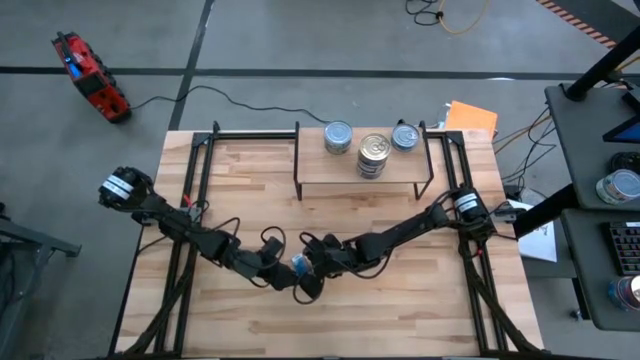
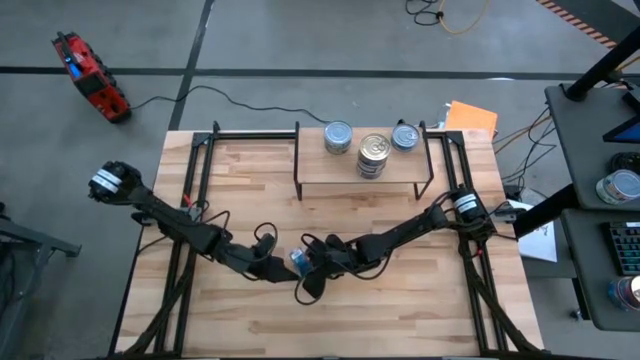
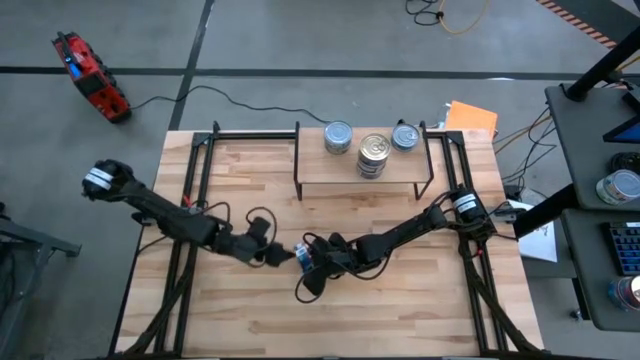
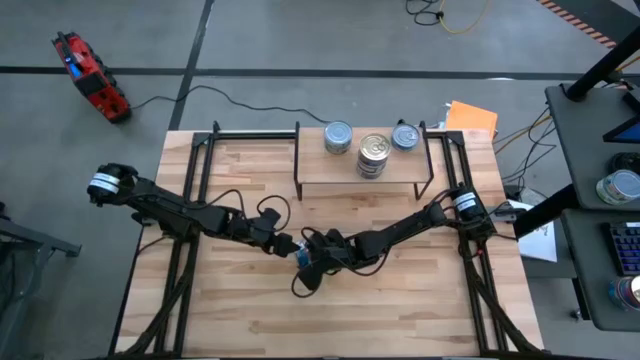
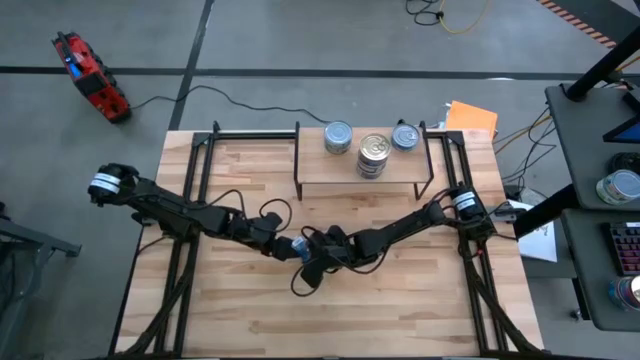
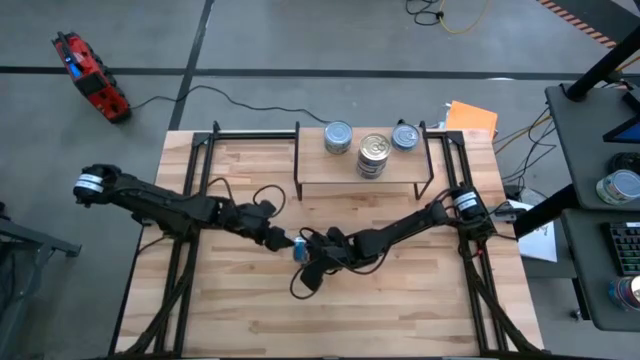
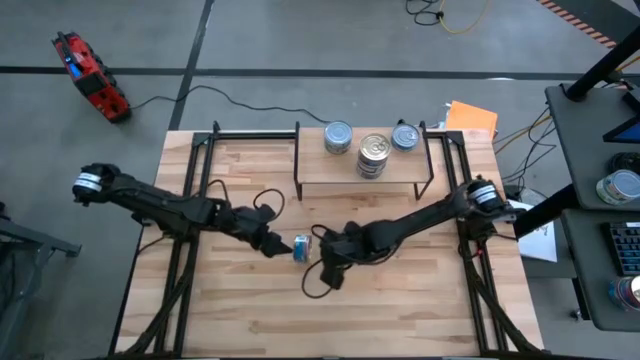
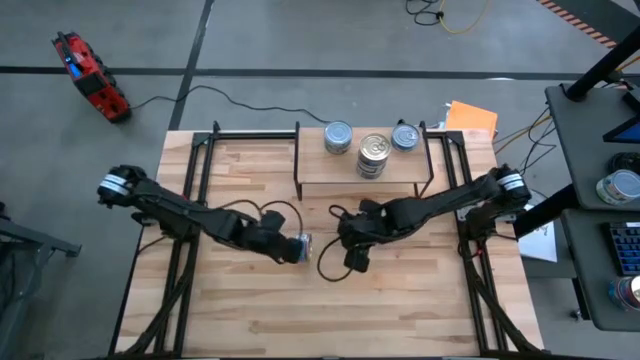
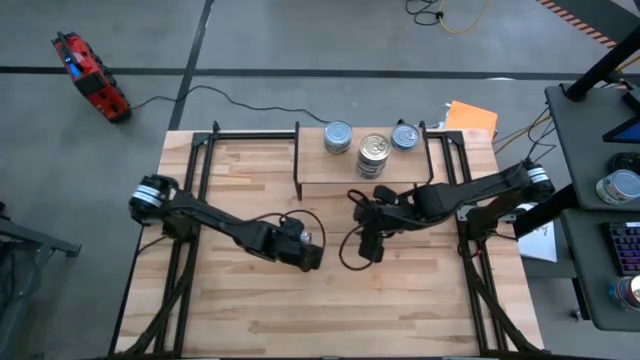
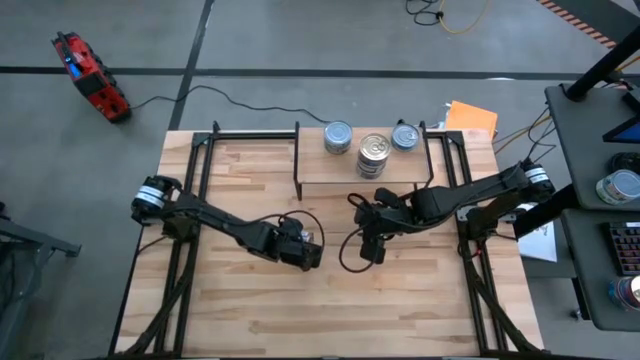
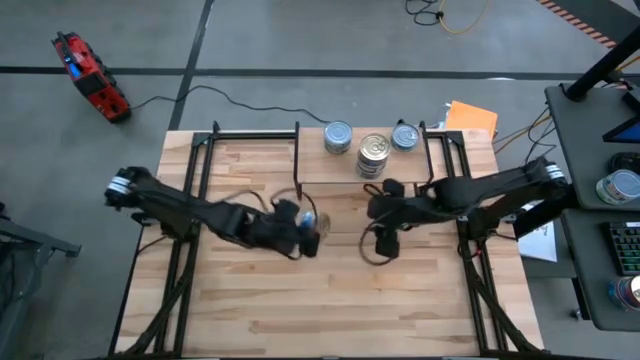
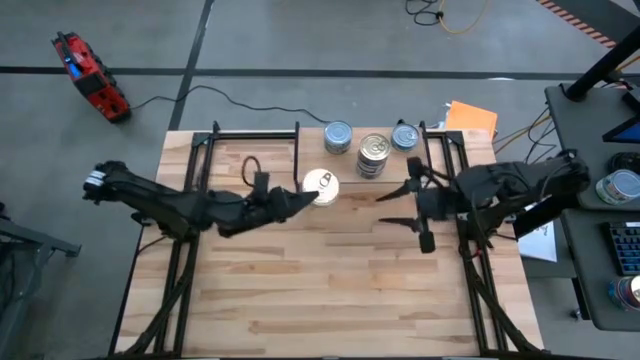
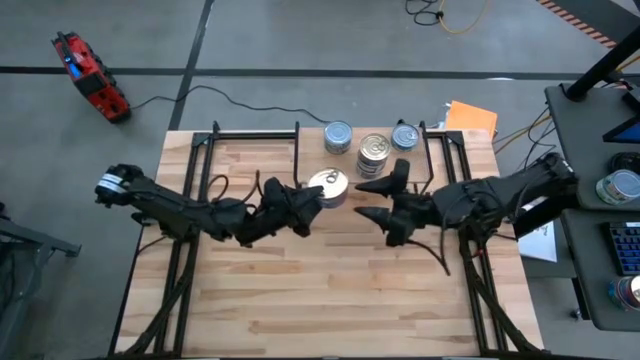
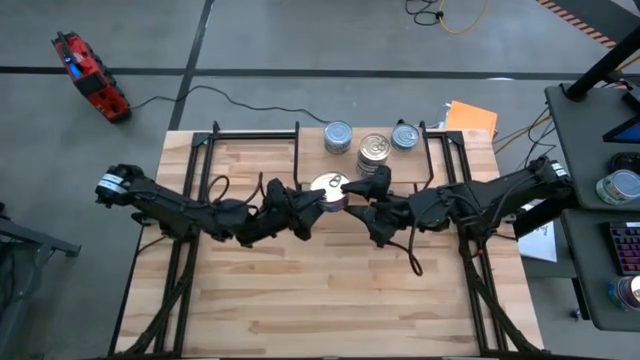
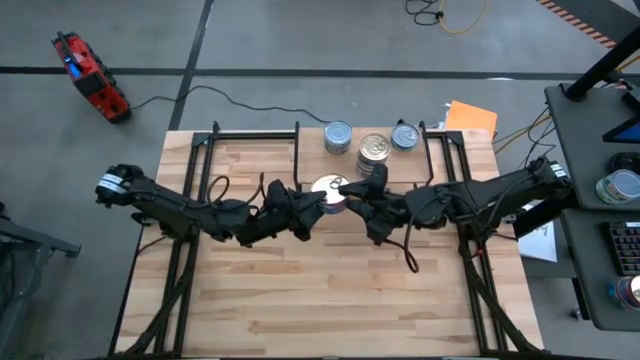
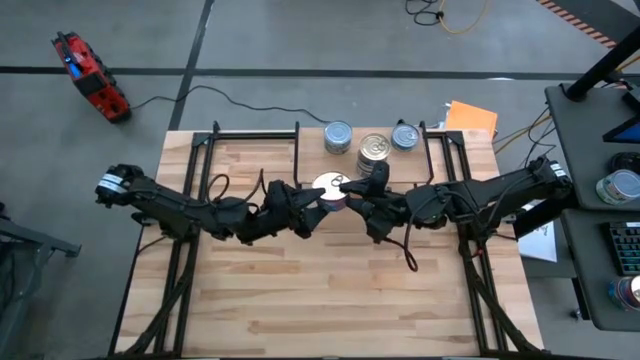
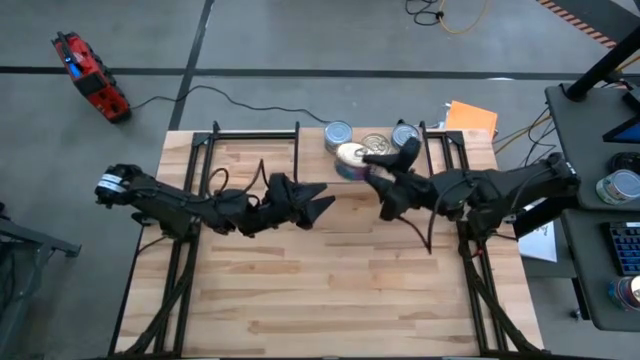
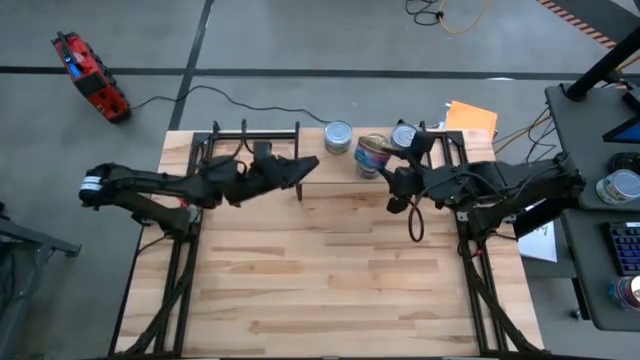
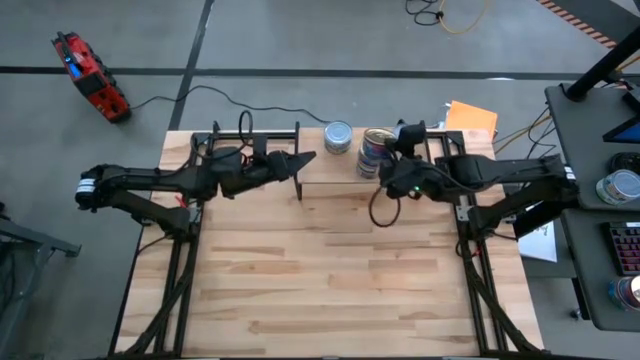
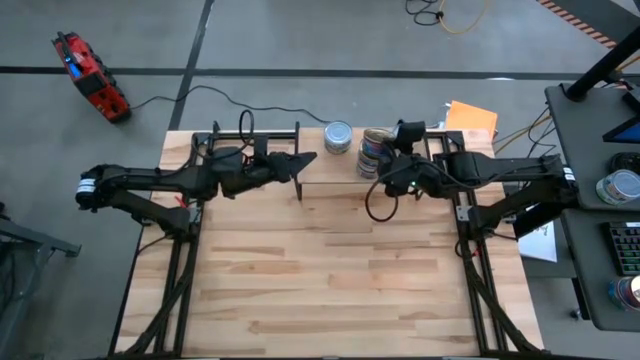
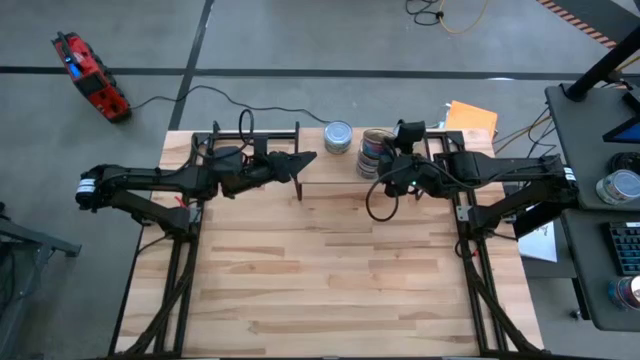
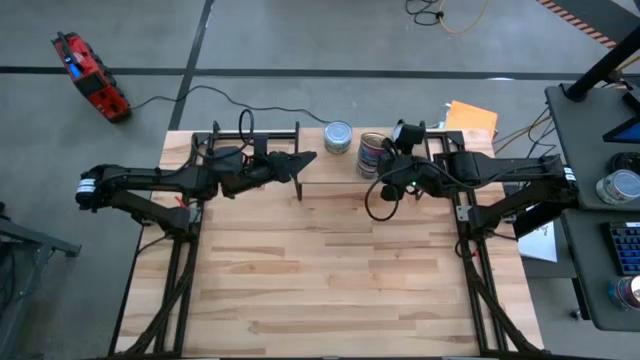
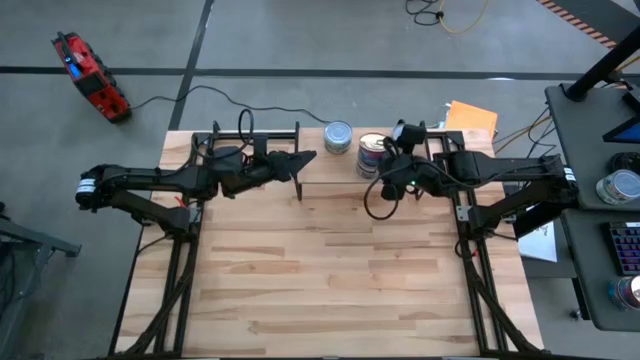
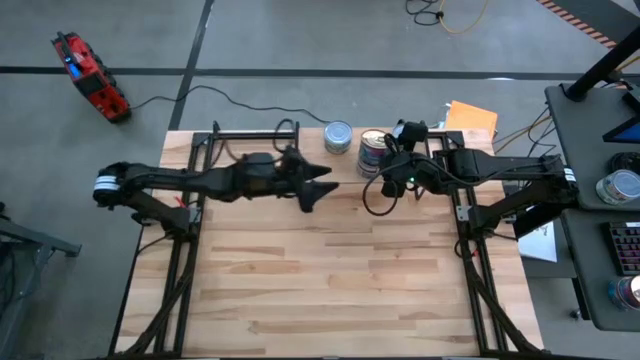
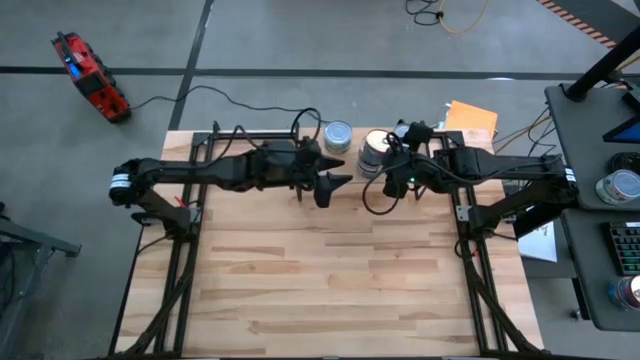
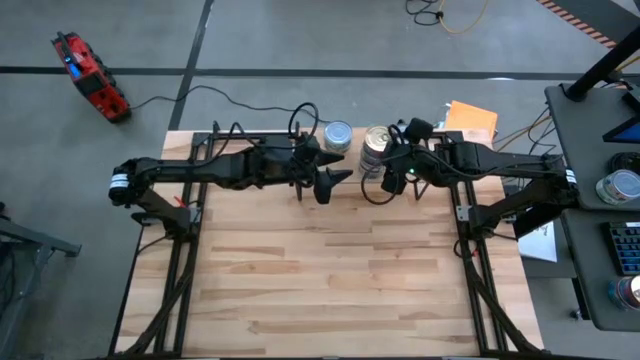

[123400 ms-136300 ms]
Task: Stack canned seafood by type on shelf
Stack the blue-pink tuna can on top of the other blue-pink tuna cans

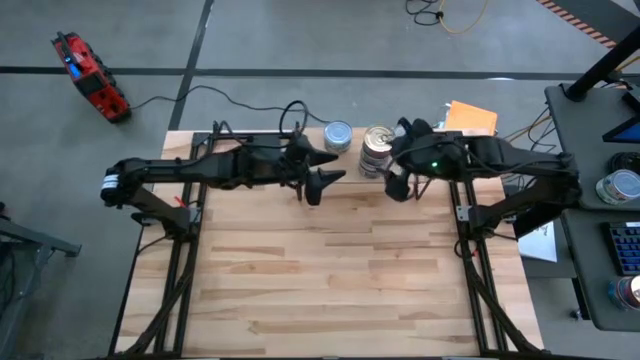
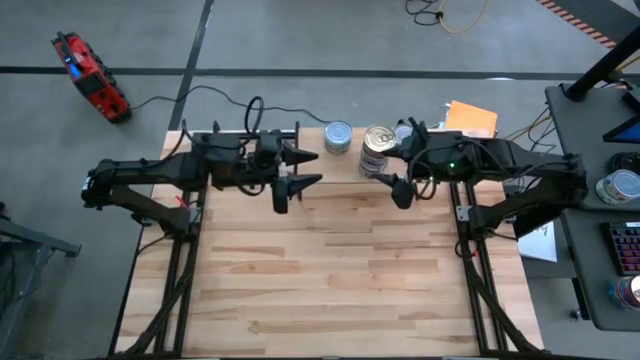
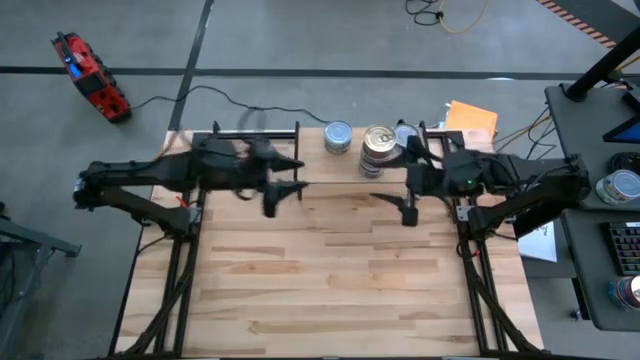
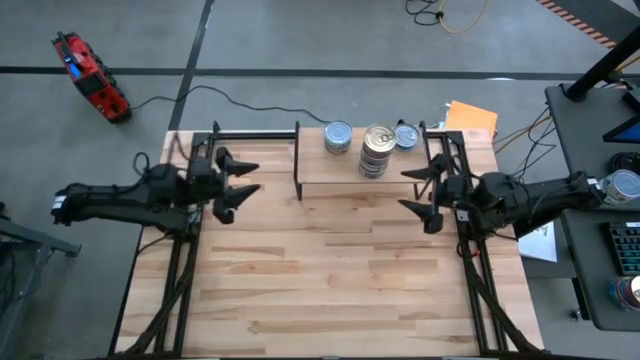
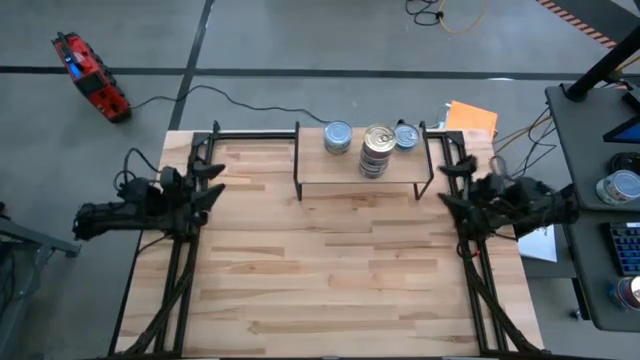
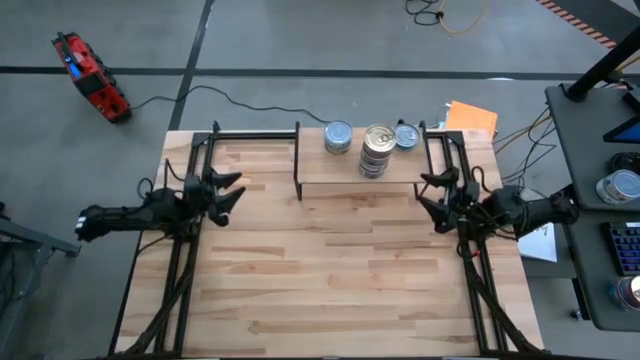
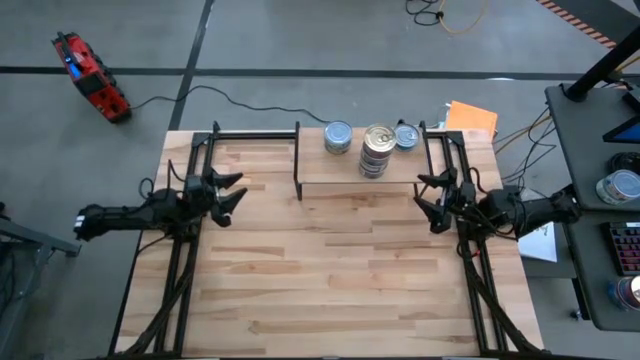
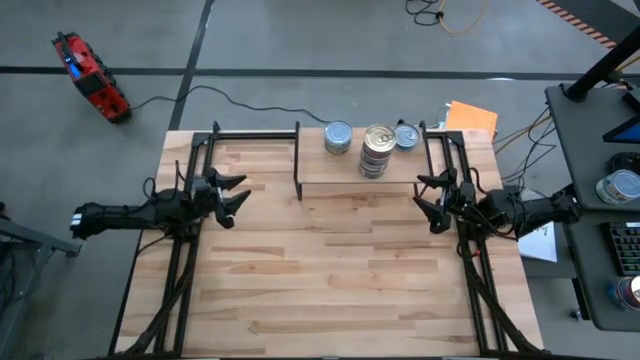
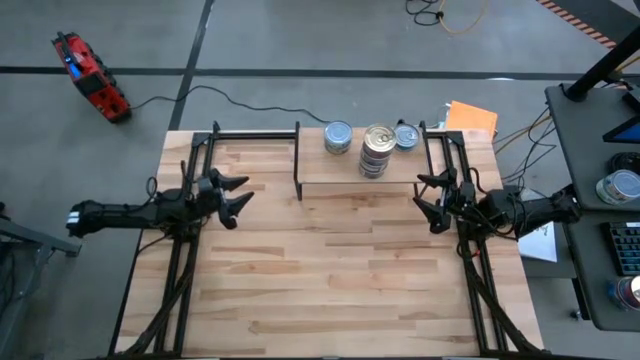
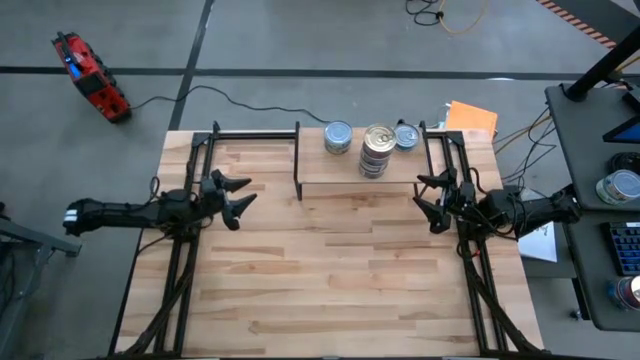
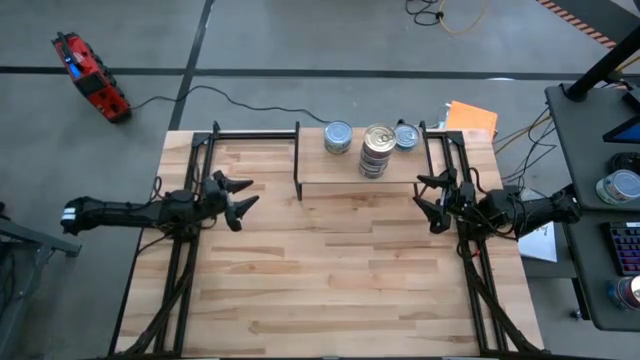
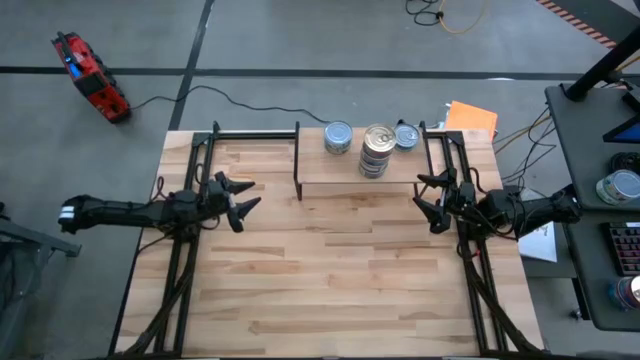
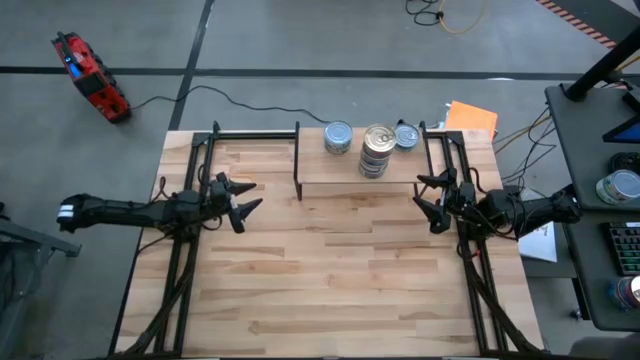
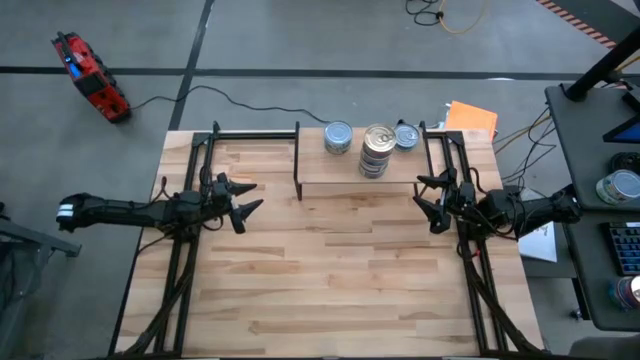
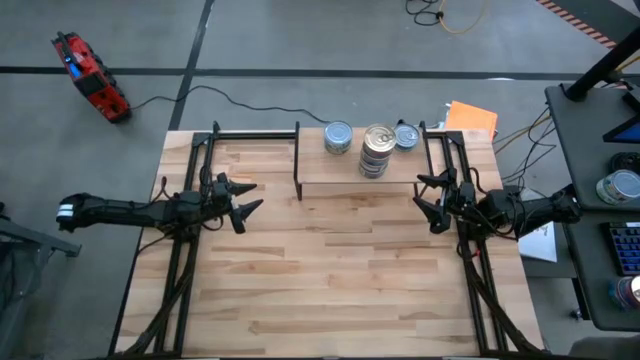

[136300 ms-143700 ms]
Return to Home Position

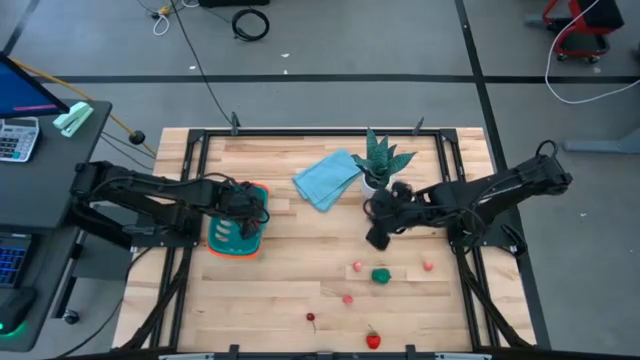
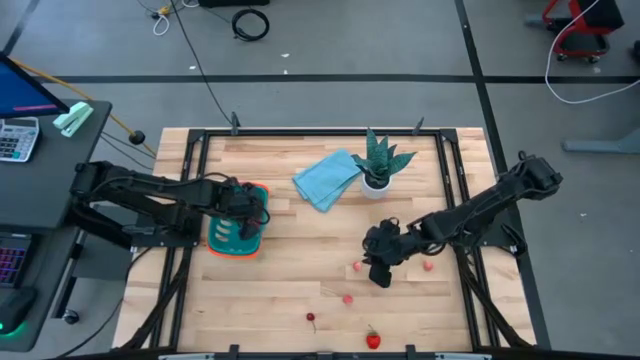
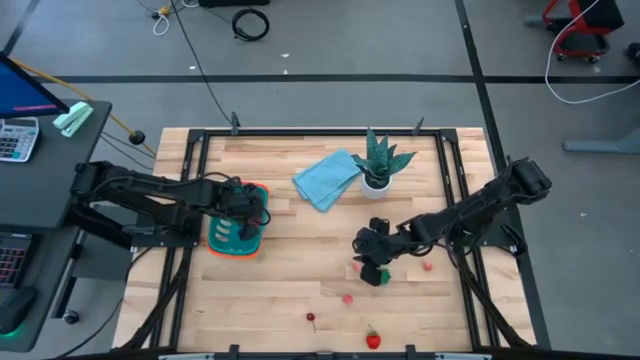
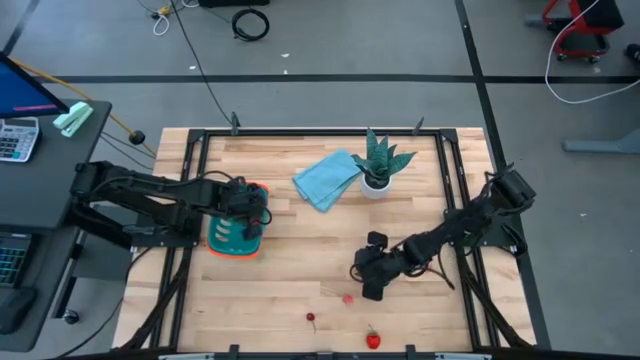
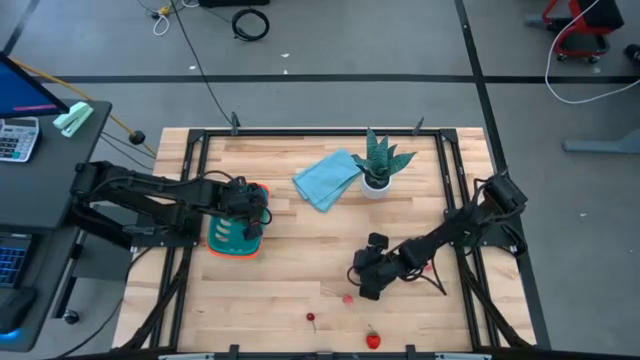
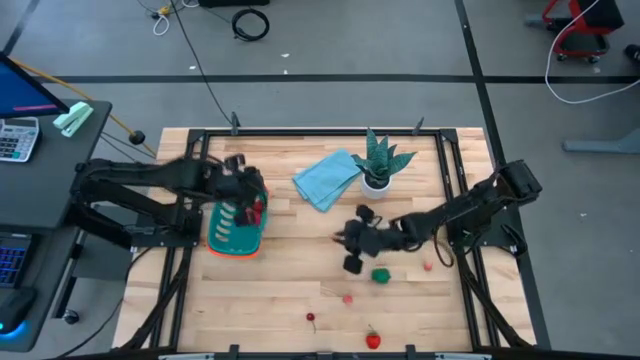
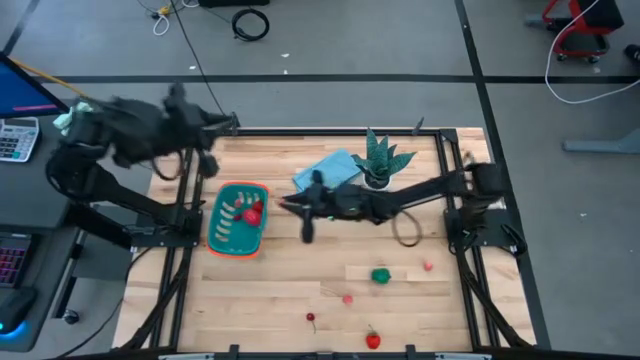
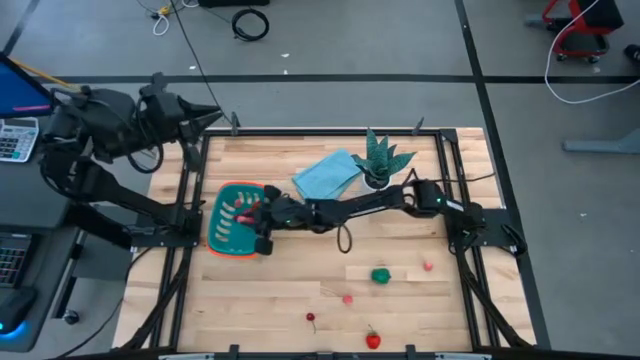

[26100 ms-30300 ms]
Task: Pick and placing Produce into tupperware
Put the top left pink peach into the blue basket
